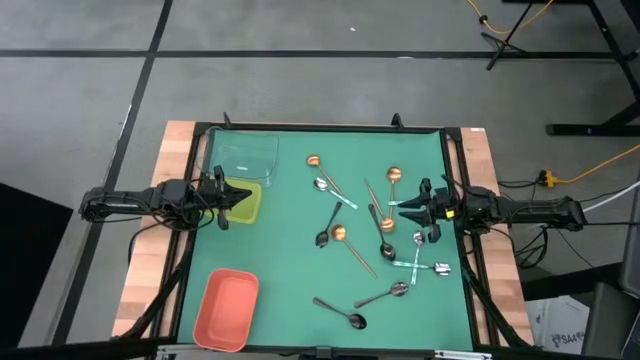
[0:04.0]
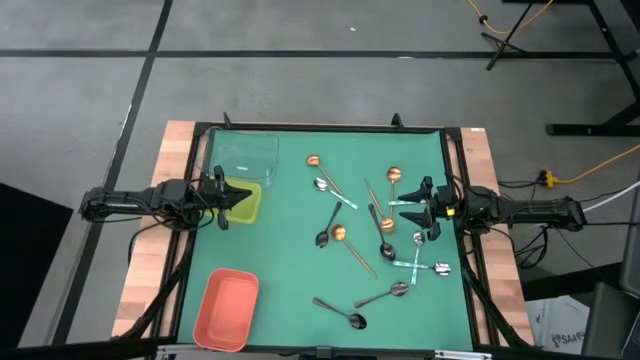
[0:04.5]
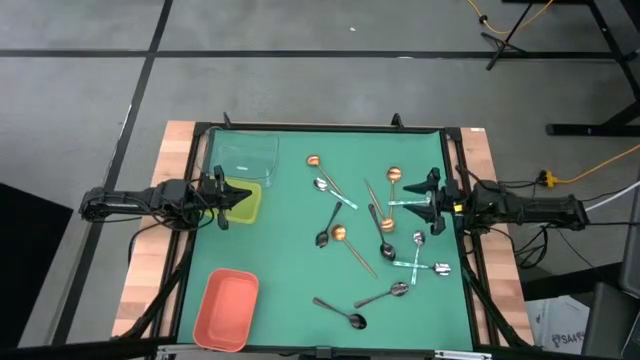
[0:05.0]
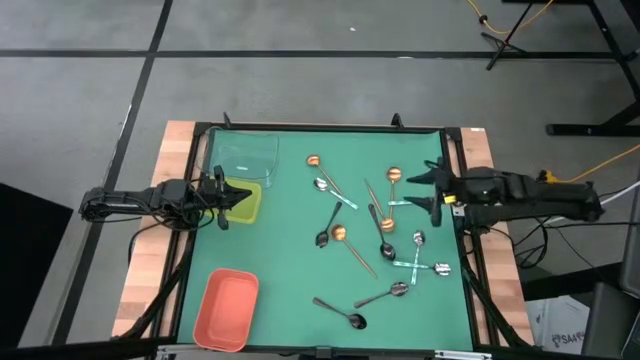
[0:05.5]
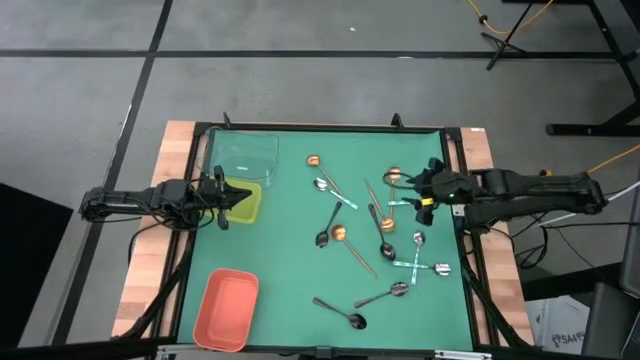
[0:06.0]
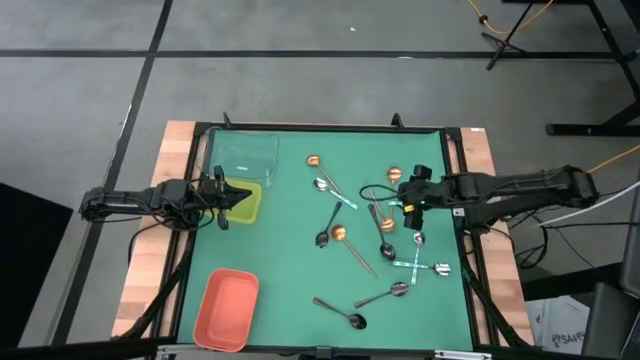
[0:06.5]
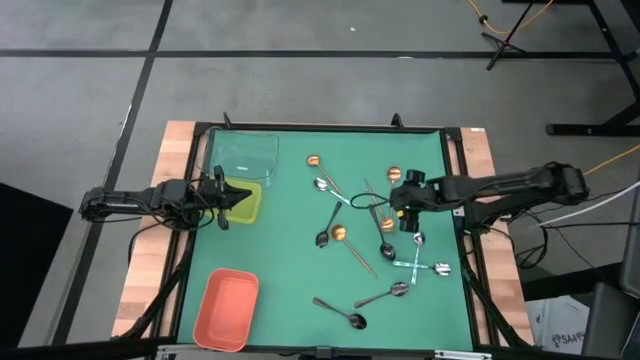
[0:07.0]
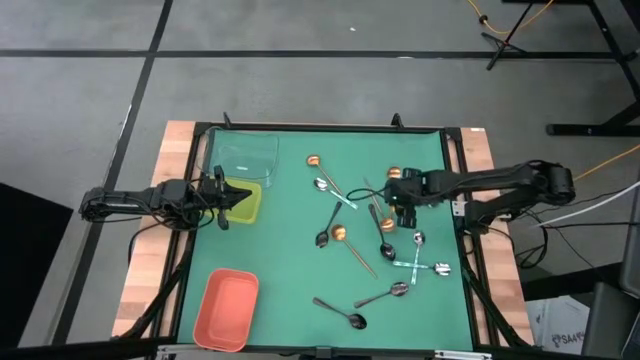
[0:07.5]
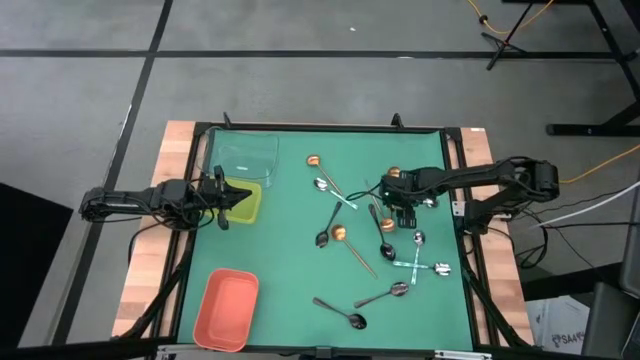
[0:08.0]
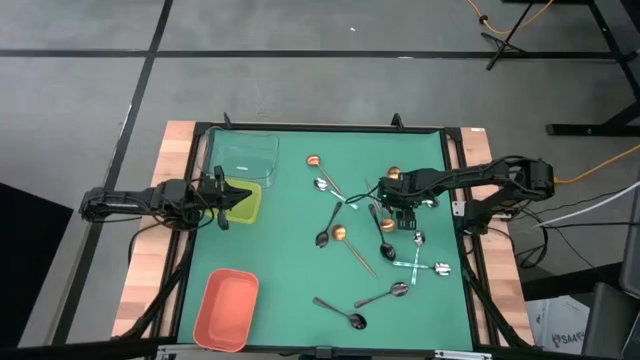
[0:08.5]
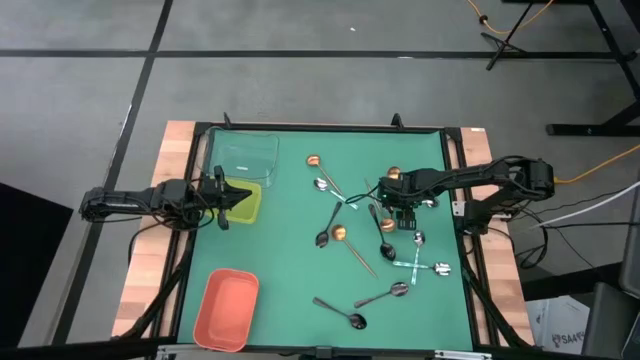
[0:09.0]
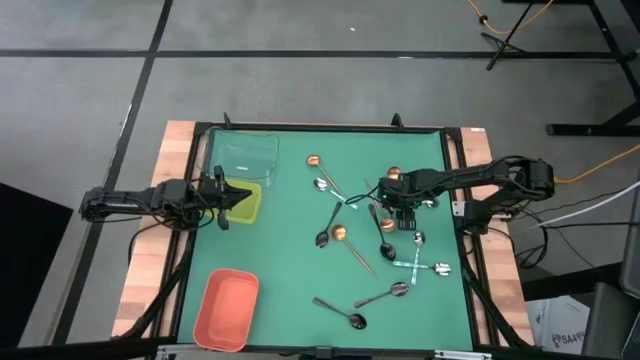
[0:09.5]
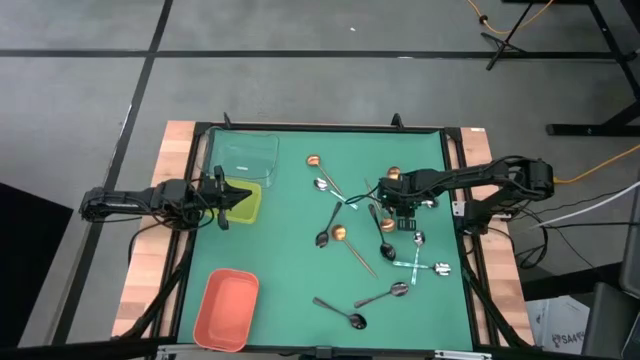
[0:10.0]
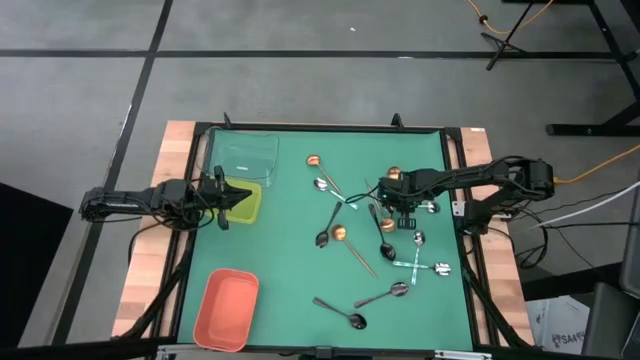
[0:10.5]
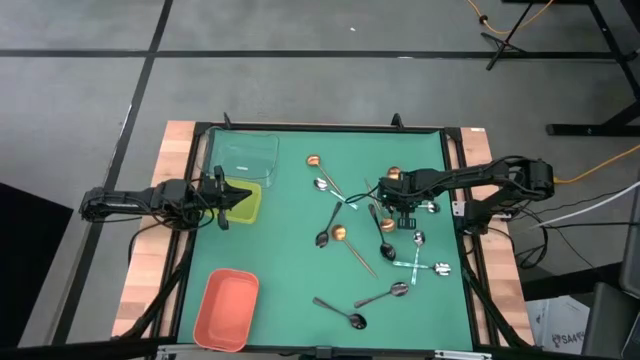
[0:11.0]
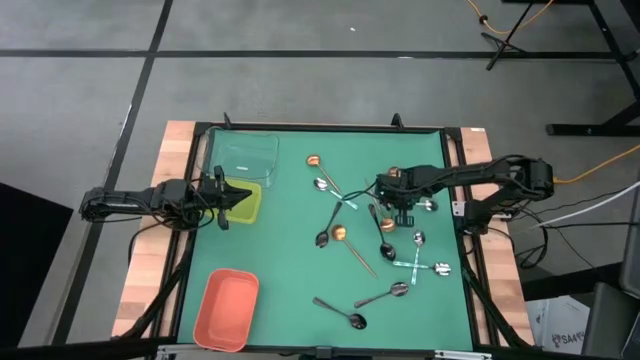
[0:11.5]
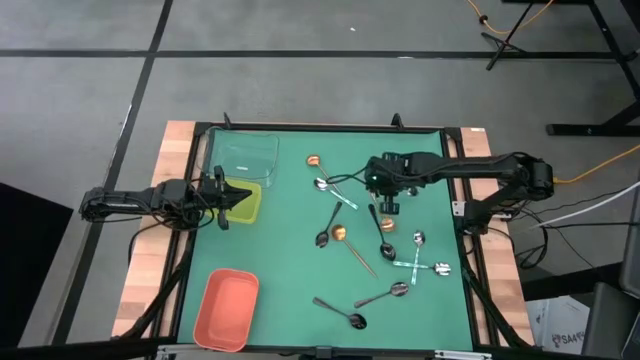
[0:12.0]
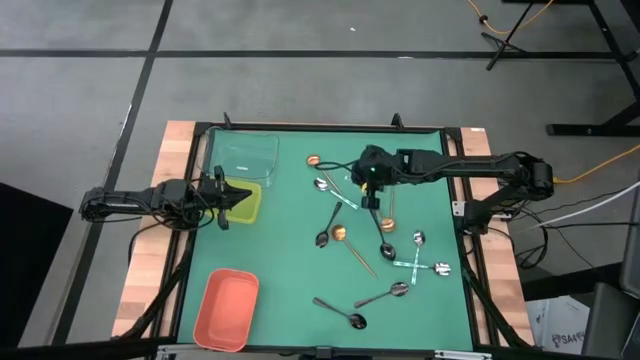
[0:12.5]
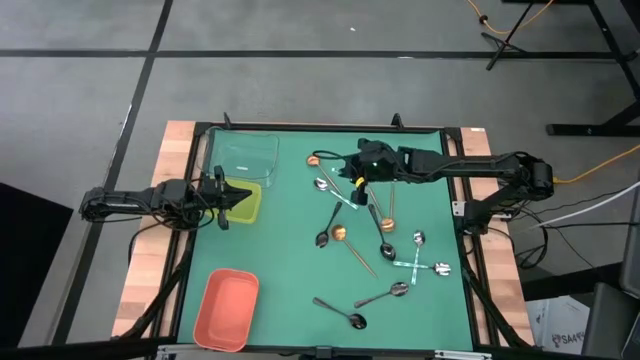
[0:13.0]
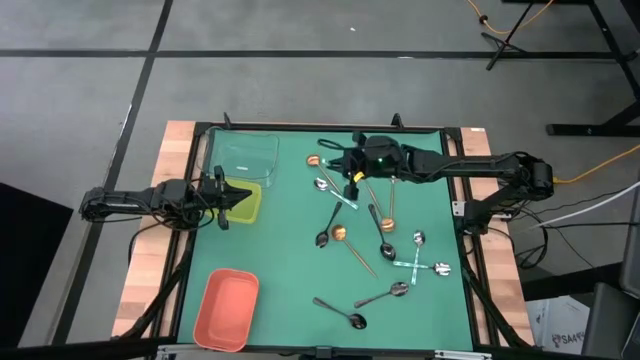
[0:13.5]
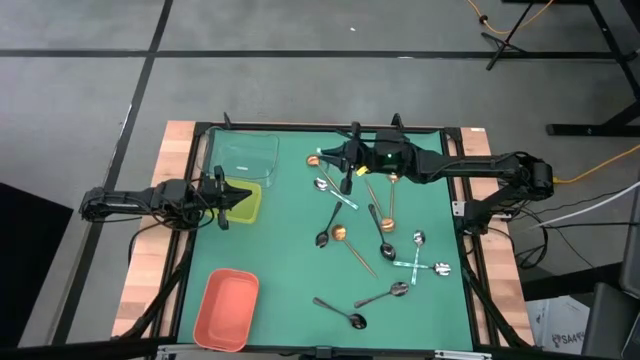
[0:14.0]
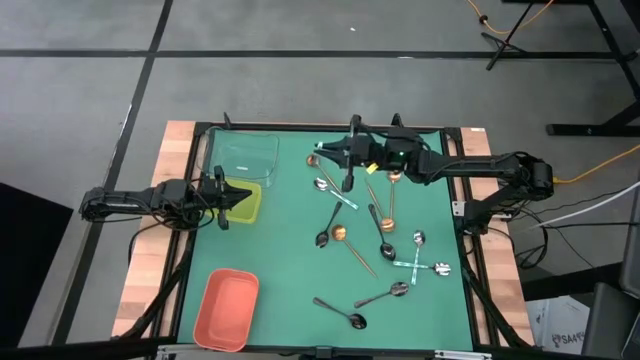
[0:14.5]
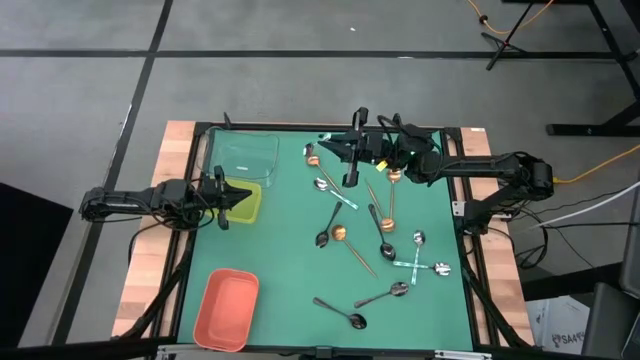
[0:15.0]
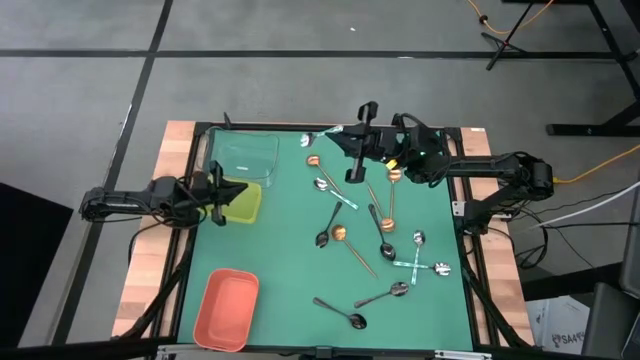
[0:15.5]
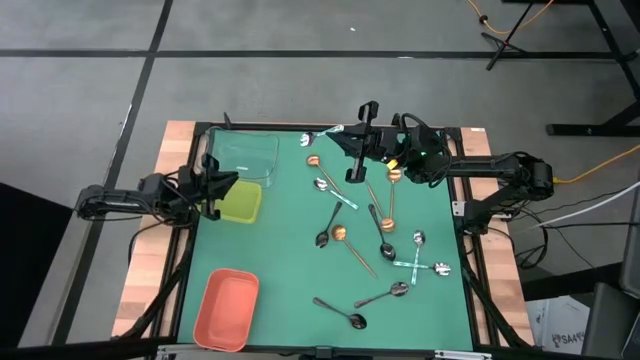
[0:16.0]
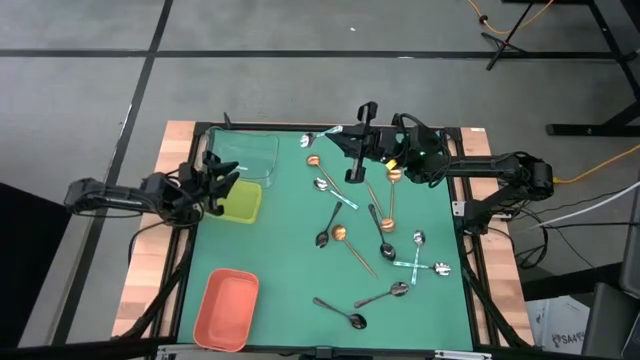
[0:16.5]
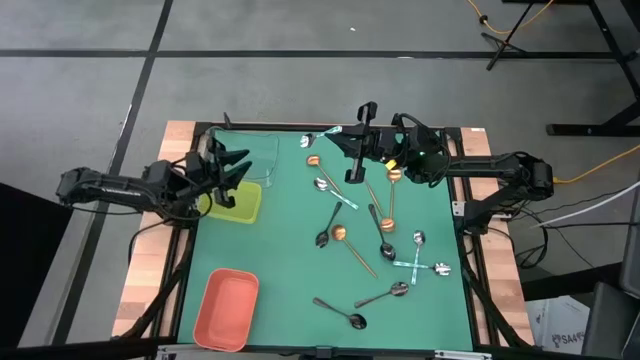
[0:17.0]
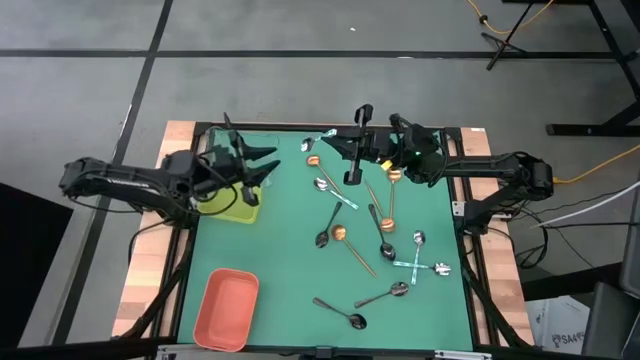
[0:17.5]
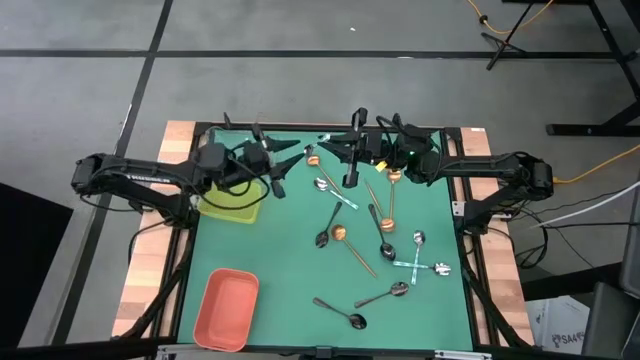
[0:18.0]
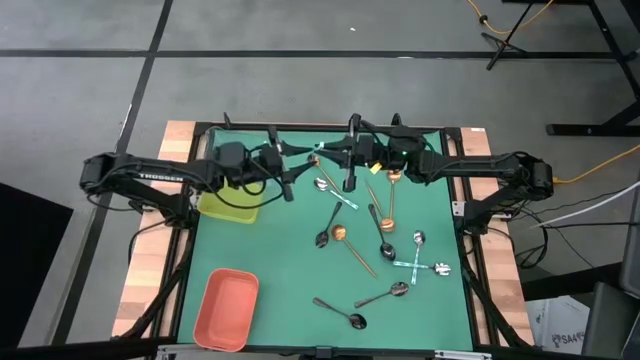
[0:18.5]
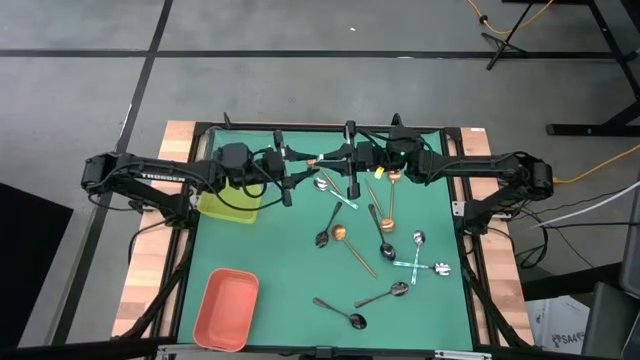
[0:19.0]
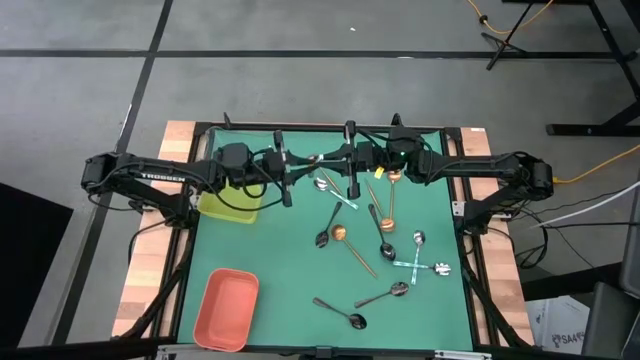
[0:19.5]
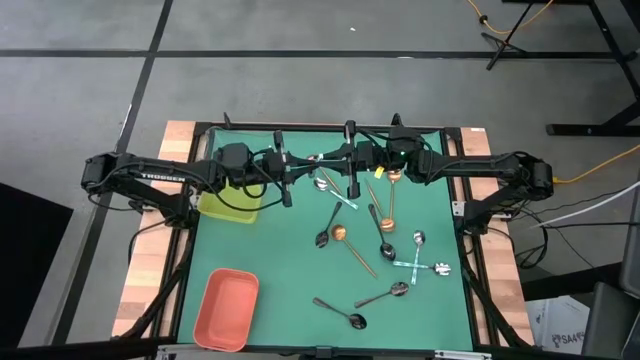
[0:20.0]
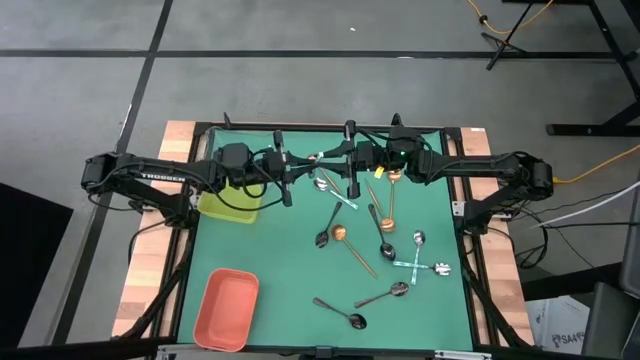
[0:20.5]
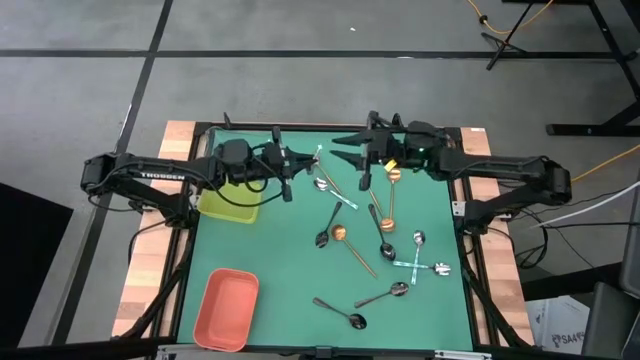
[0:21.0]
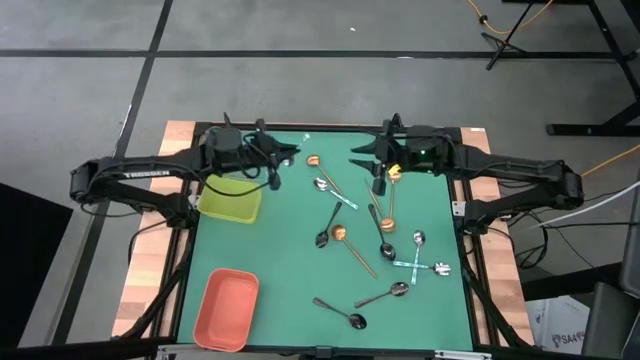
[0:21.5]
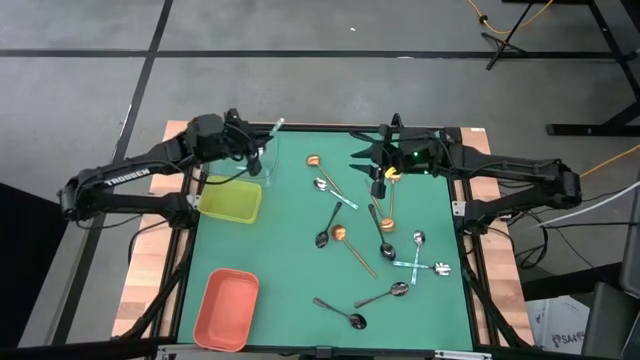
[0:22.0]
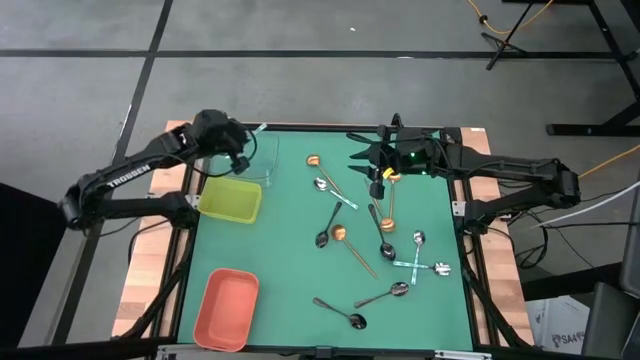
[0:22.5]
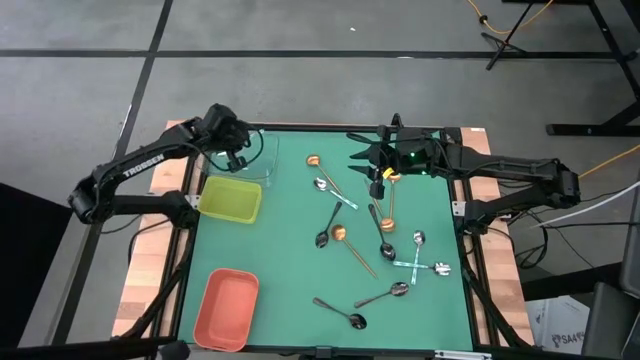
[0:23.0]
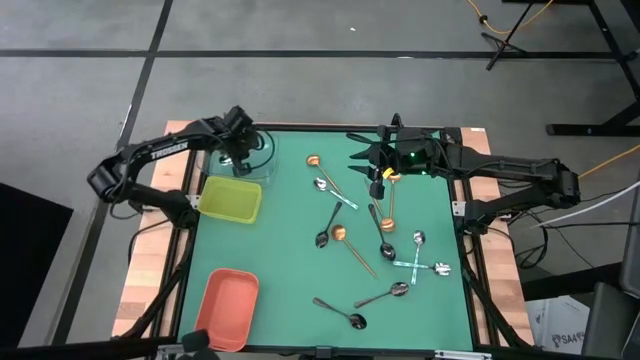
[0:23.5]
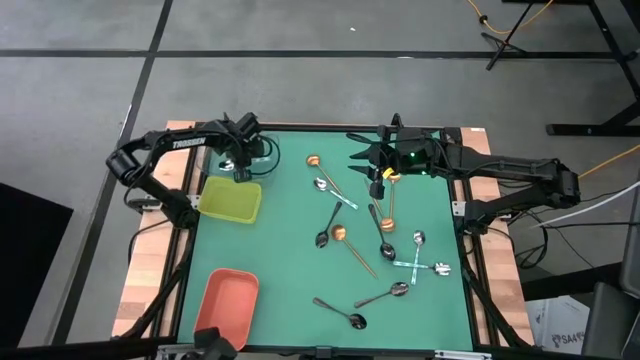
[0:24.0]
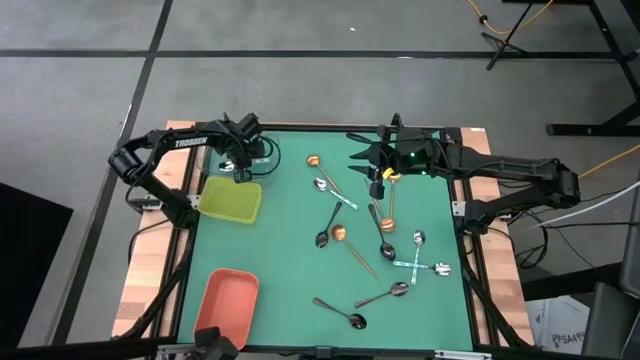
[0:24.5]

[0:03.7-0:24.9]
Task: Sort silverware by color (type)
Put the white spoon into the transparent bin
